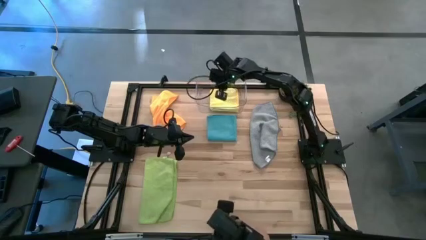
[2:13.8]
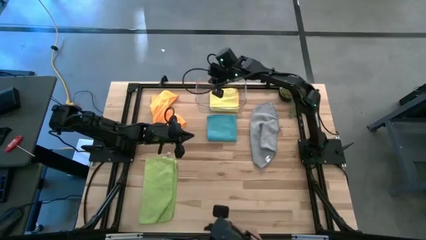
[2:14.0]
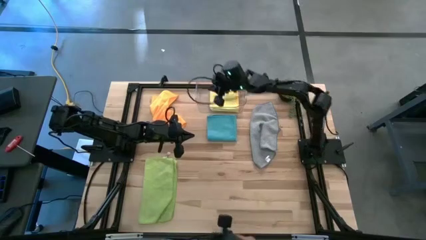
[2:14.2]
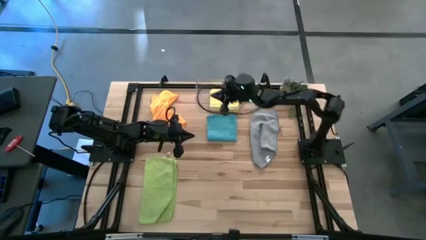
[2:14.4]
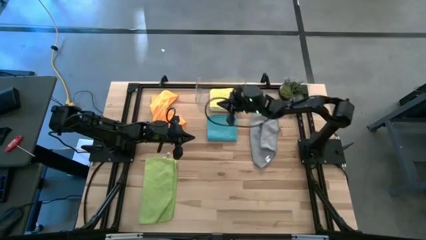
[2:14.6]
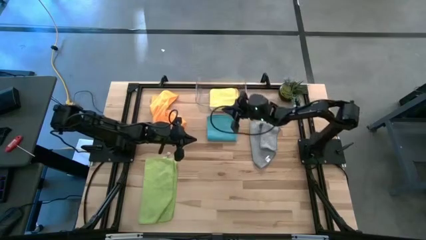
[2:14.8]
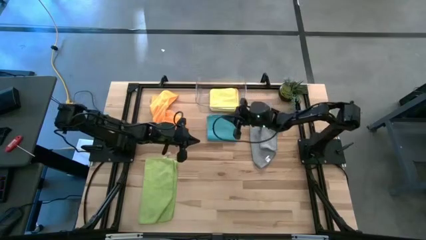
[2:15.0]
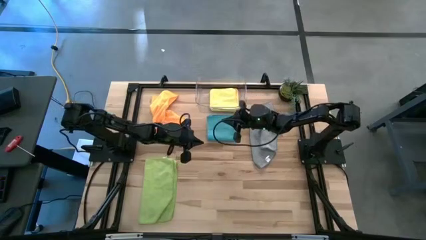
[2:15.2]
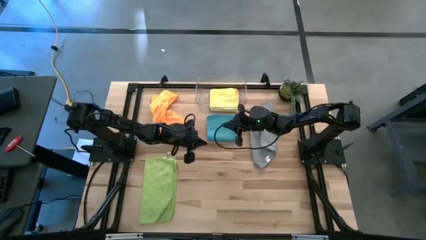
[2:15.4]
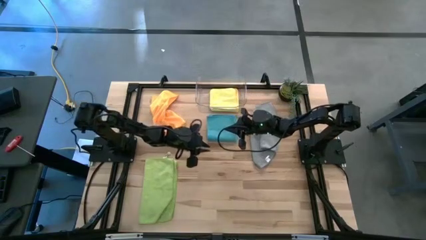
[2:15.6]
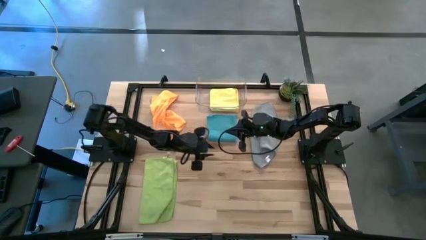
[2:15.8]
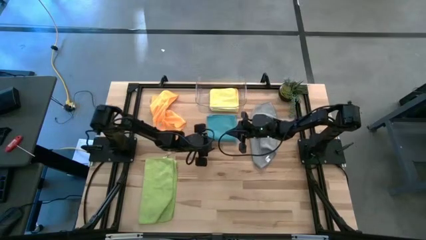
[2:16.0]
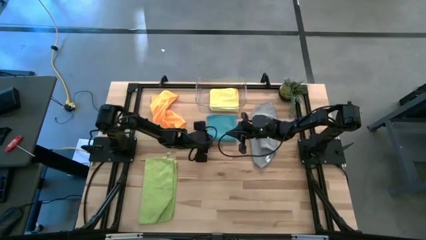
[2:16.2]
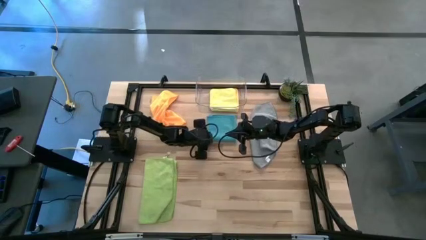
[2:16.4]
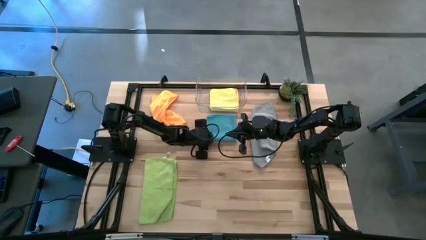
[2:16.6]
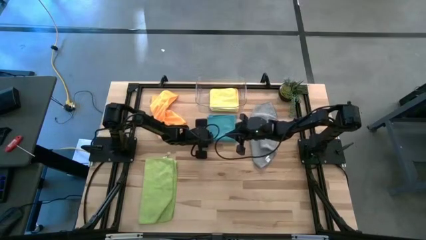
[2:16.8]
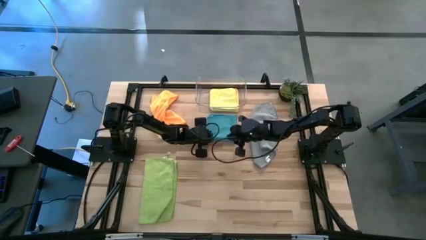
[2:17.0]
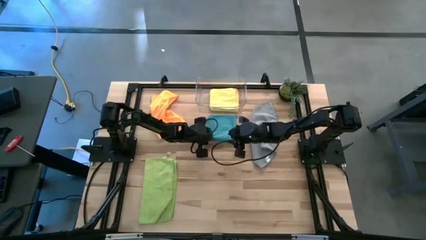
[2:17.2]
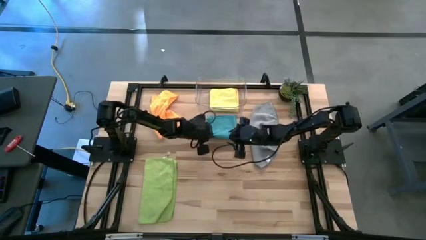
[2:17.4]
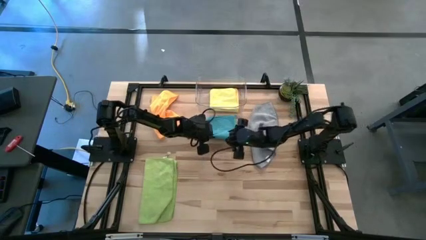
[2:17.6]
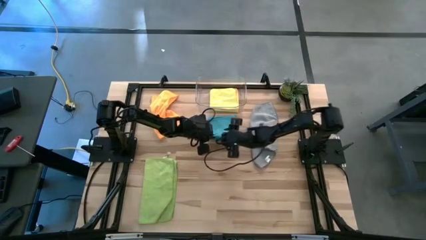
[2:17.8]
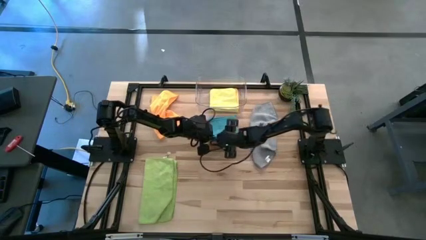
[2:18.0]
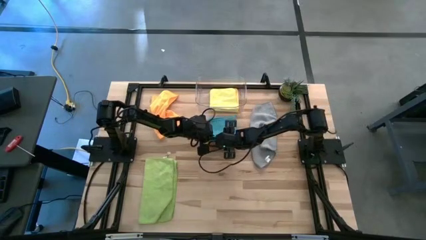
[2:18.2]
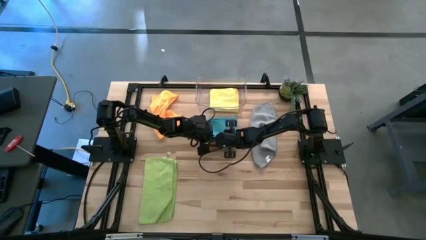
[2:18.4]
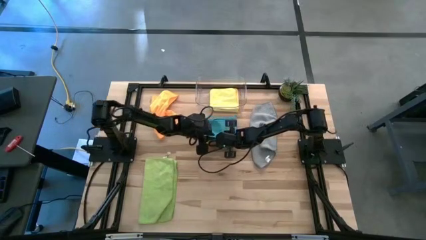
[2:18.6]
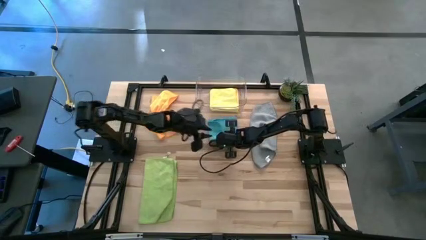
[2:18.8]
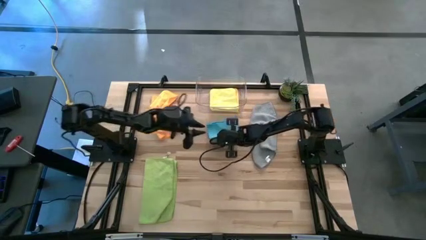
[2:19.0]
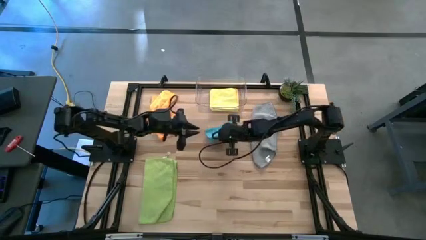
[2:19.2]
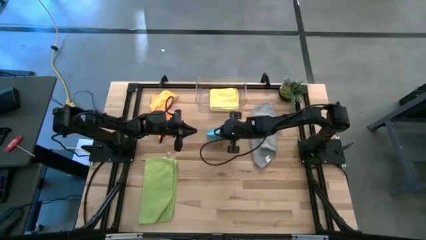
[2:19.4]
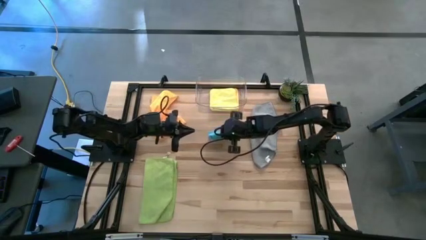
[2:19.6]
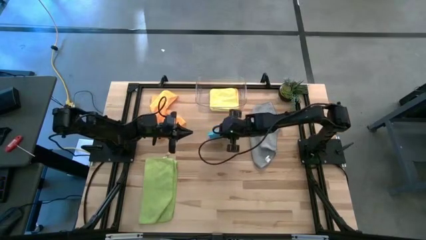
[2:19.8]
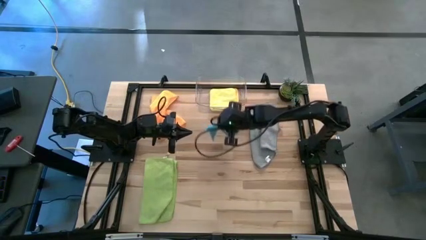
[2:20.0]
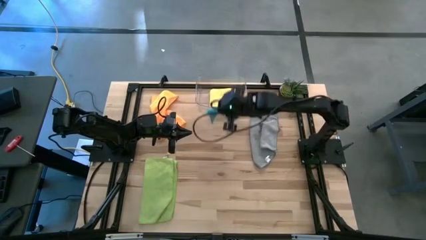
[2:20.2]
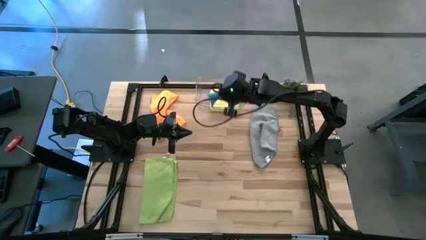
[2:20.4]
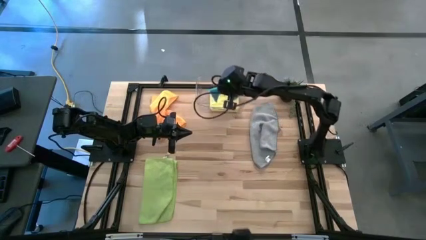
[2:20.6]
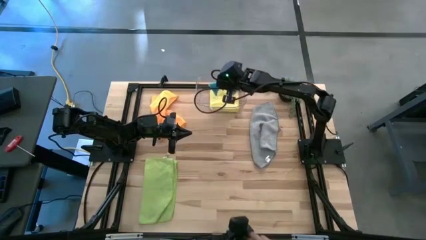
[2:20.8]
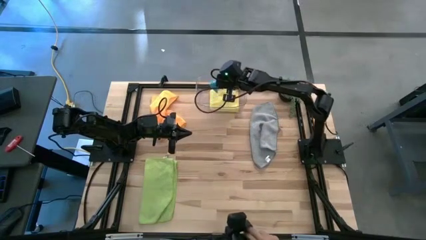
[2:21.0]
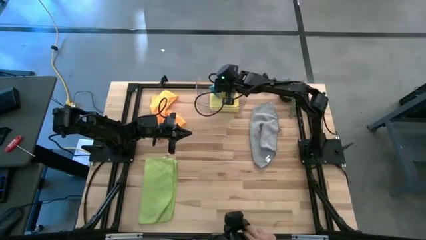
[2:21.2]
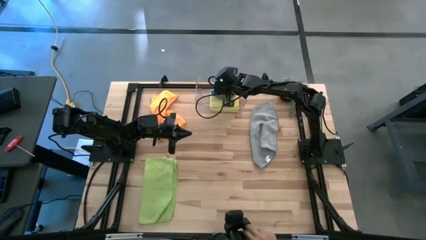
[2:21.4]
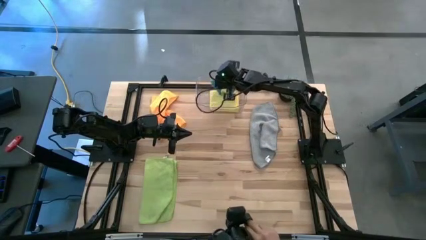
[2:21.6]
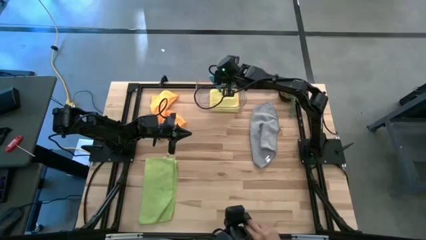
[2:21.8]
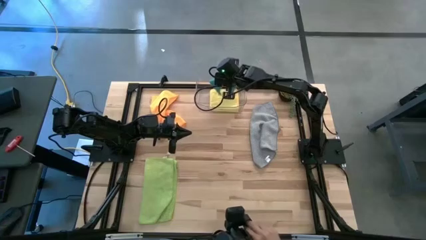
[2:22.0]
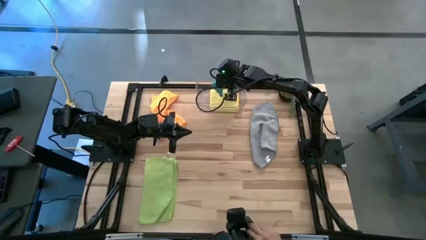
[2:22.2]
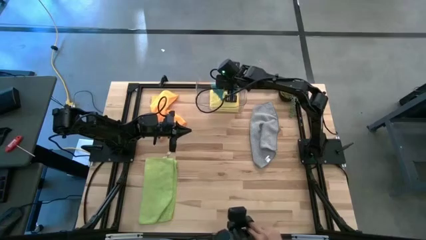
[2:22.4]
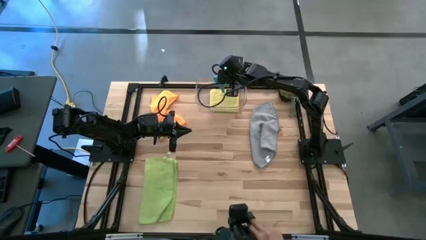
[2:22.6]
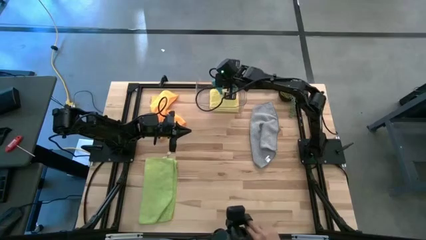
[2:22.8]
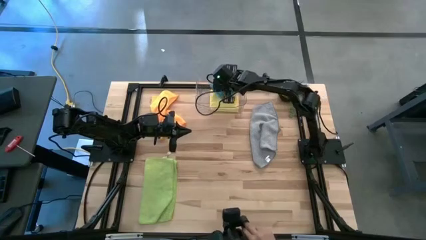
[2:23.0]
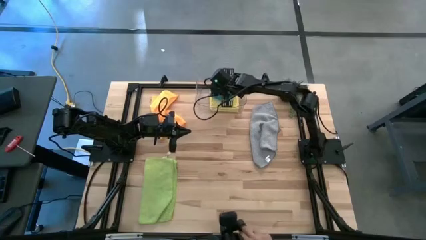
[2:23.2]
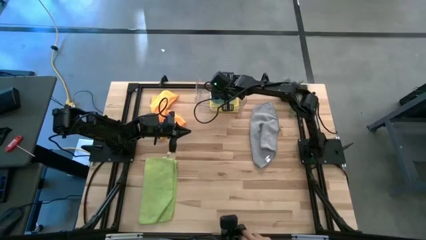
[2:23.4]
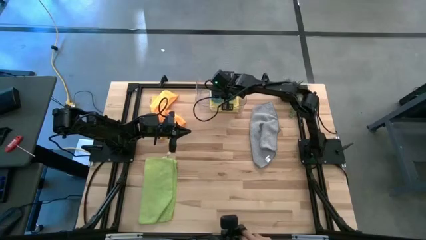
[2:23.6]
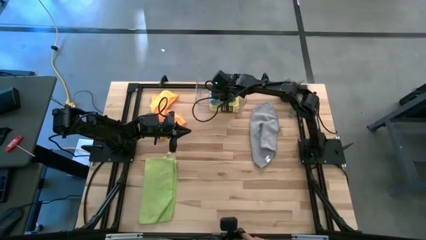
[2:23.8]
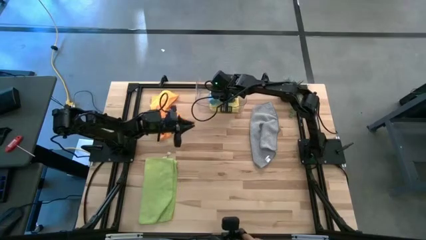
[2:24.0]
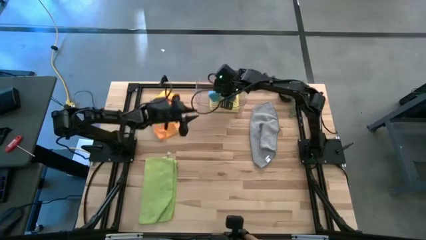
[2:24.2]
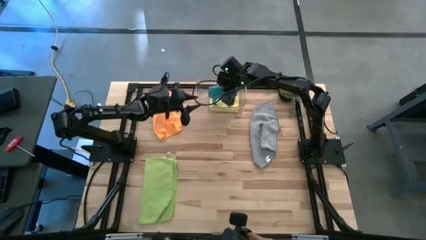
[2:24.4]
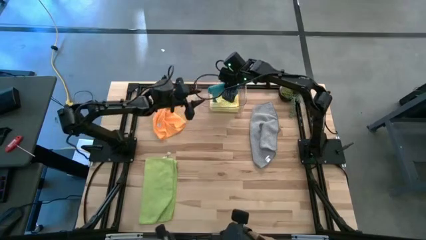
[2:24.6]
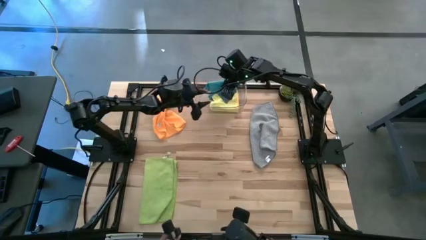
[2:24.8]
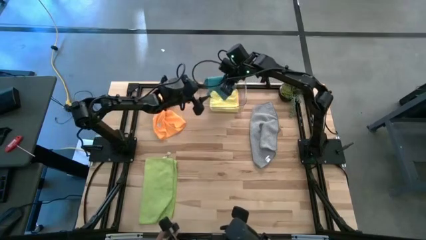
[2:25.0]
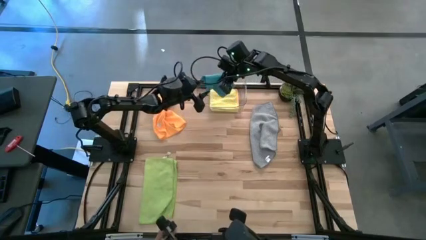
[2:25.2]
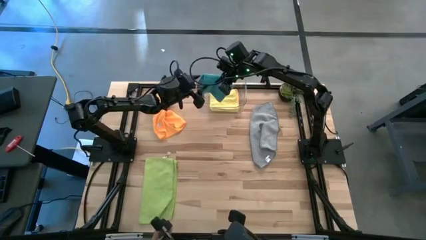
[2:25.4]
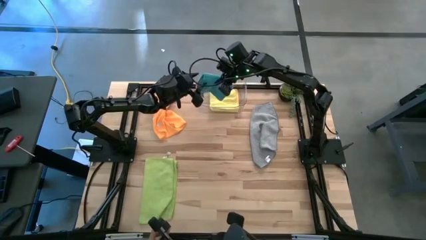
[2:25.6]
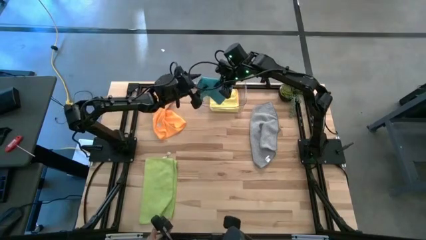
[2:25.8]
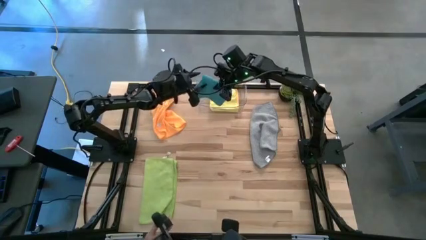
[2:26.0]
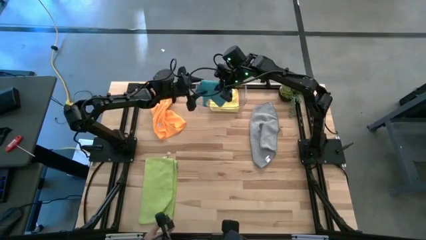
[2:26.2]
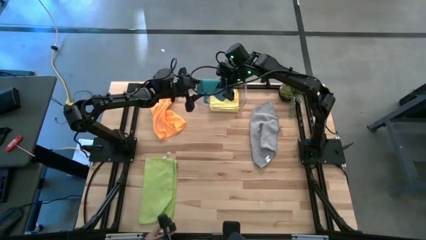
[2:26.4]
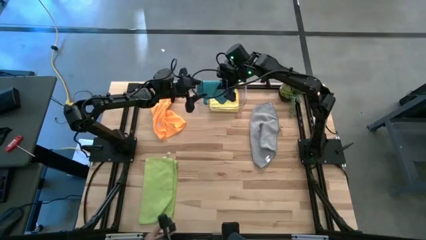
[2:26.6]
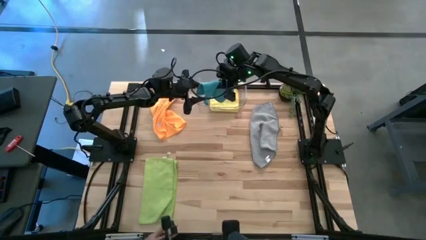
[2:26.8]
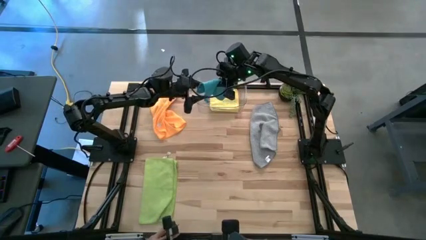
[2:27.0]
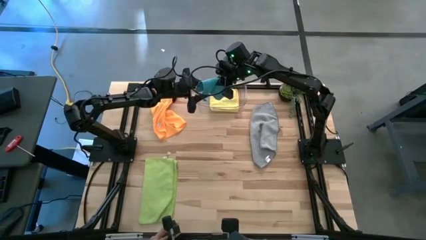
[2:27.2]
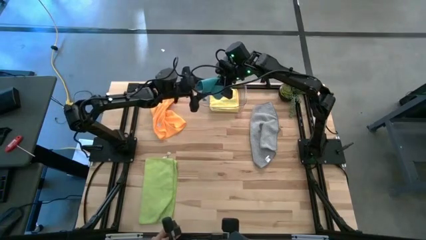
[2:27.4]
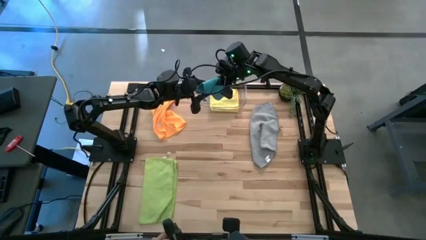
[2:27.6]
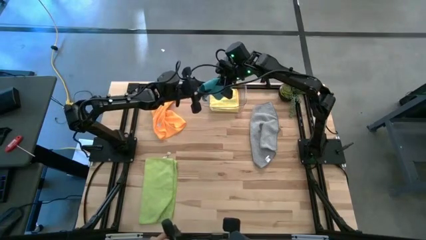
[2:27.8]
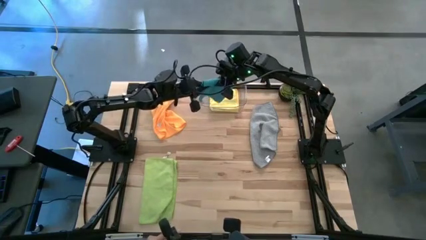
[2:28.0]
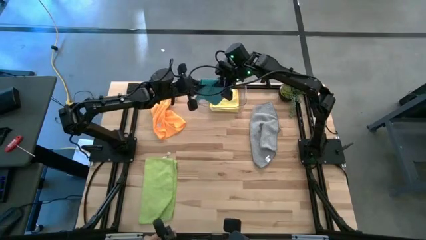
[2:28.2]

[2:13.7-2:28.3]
Task: Fold microfiber towels
Stack the blue towel on top of the yellow towel in the transparent bin
